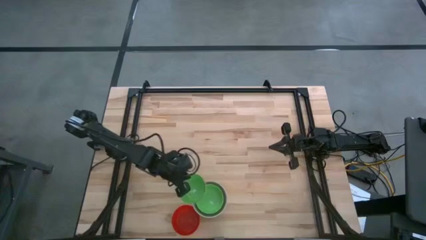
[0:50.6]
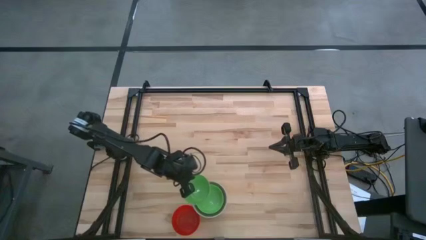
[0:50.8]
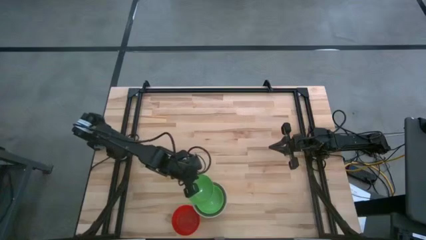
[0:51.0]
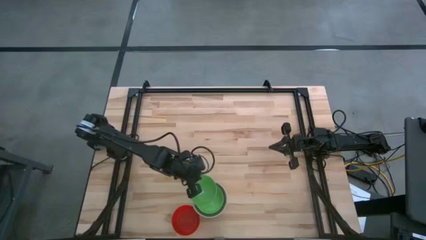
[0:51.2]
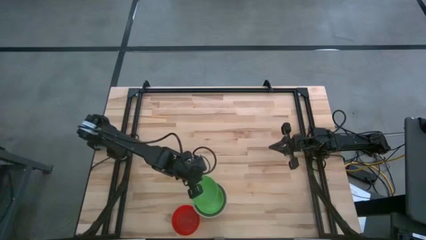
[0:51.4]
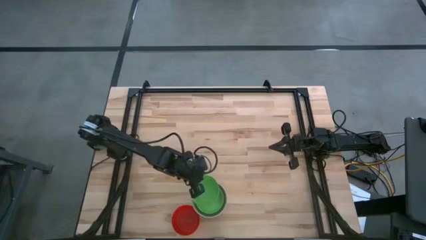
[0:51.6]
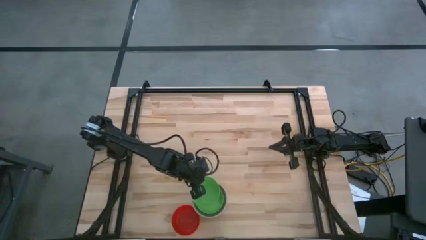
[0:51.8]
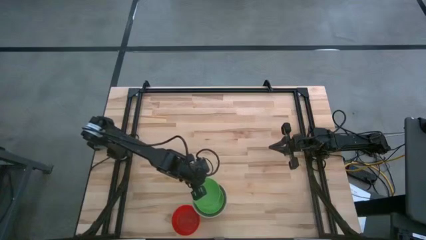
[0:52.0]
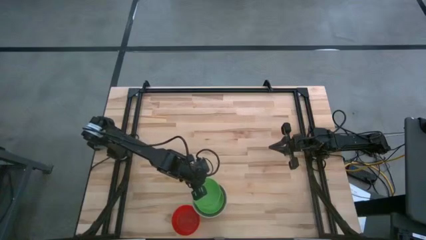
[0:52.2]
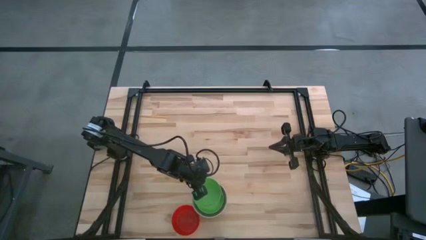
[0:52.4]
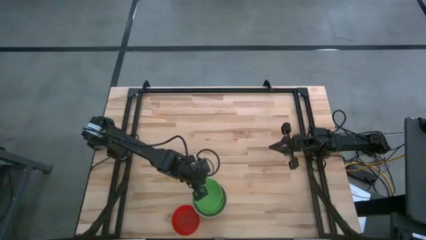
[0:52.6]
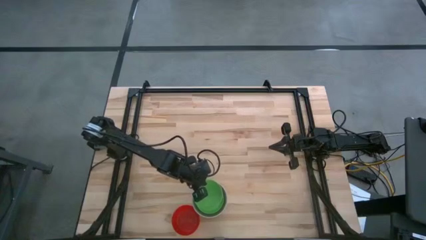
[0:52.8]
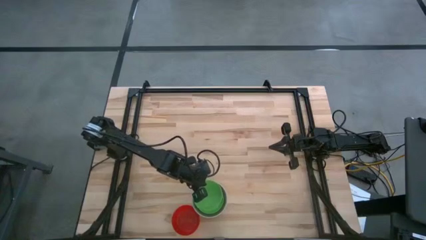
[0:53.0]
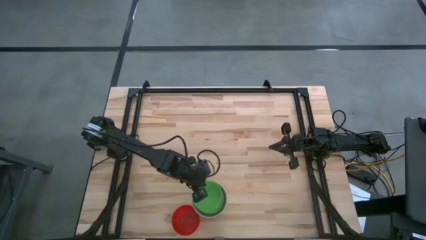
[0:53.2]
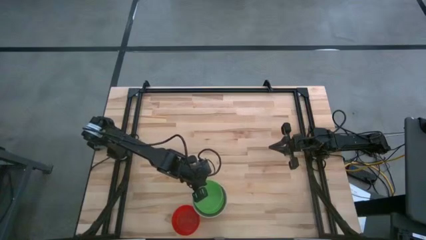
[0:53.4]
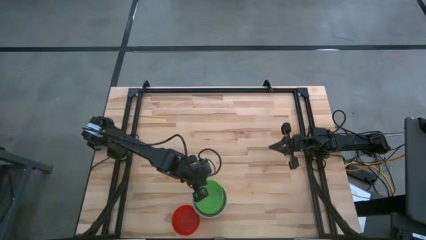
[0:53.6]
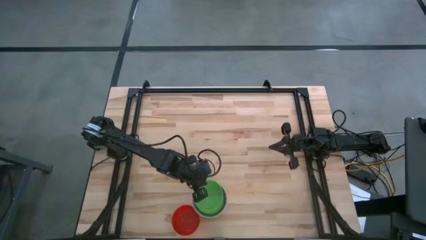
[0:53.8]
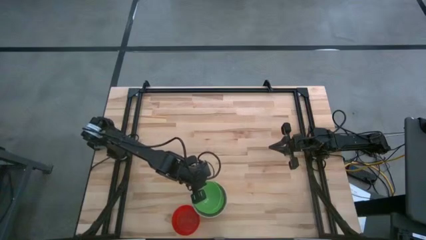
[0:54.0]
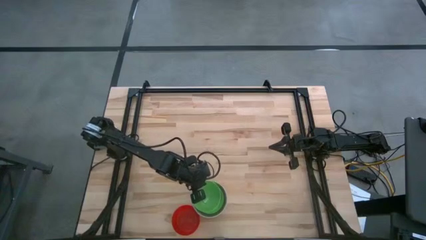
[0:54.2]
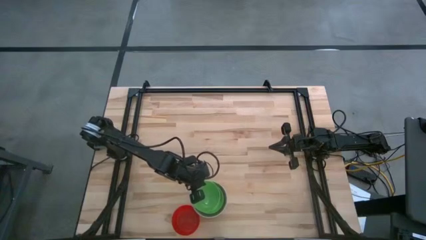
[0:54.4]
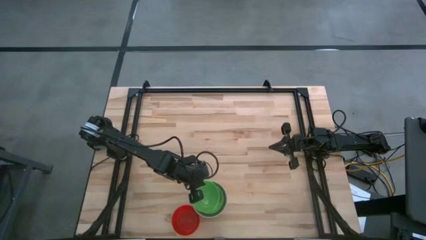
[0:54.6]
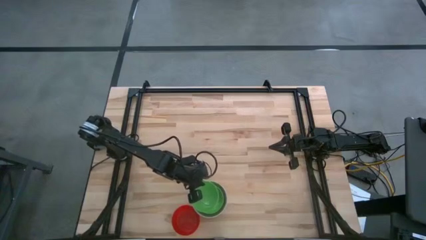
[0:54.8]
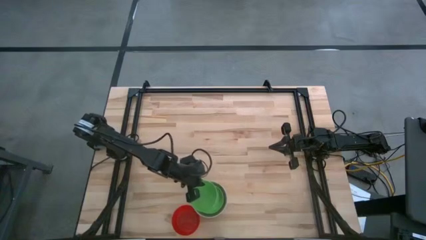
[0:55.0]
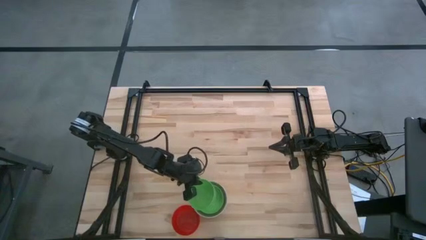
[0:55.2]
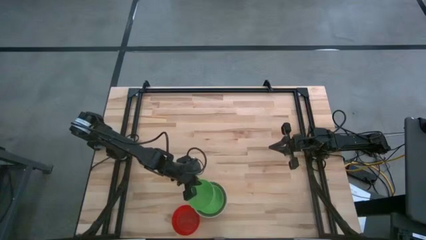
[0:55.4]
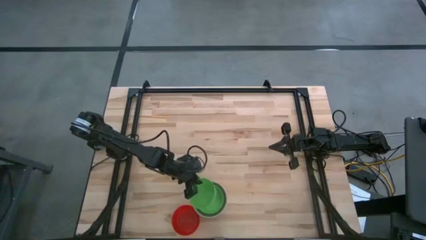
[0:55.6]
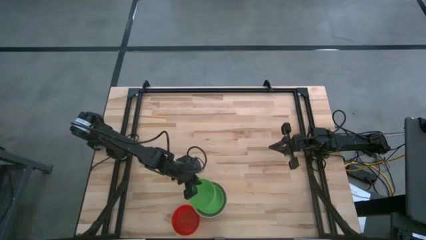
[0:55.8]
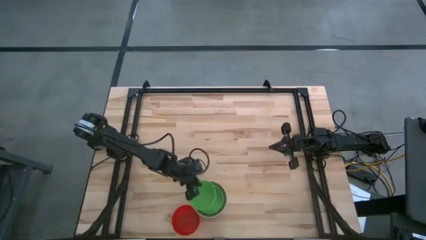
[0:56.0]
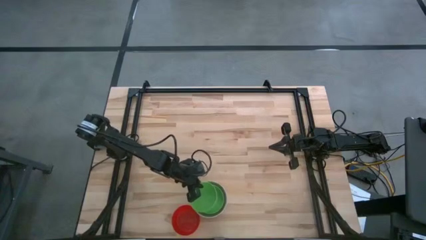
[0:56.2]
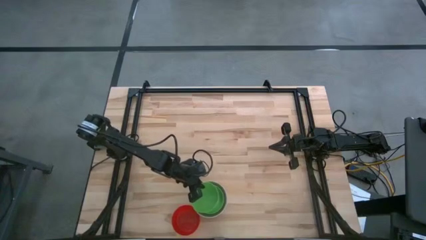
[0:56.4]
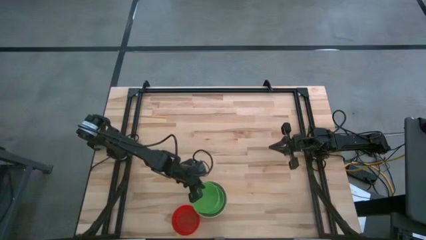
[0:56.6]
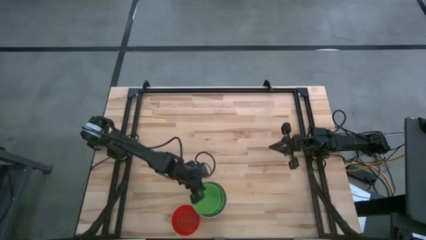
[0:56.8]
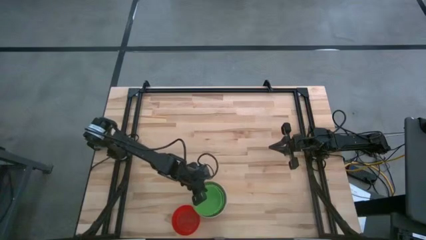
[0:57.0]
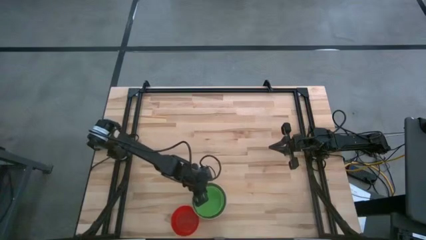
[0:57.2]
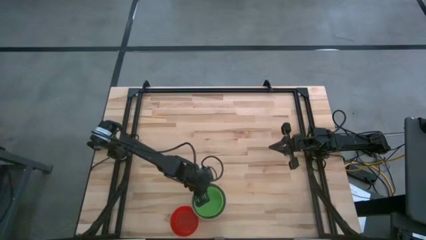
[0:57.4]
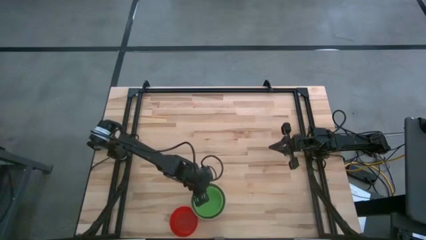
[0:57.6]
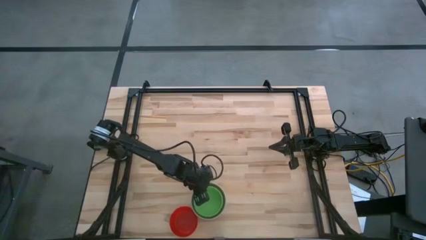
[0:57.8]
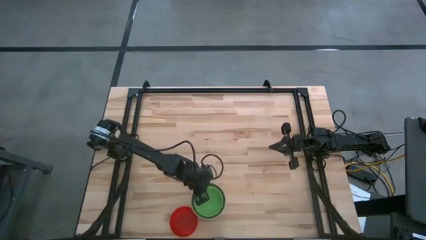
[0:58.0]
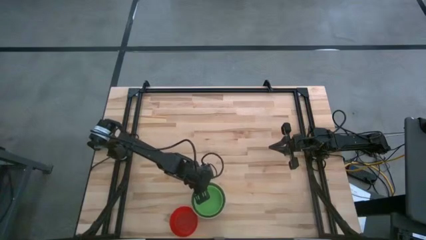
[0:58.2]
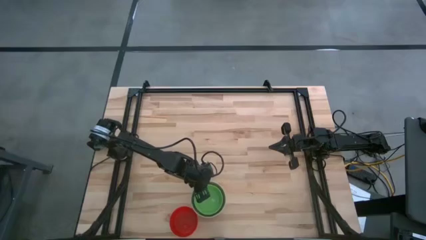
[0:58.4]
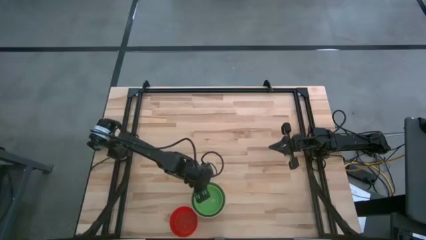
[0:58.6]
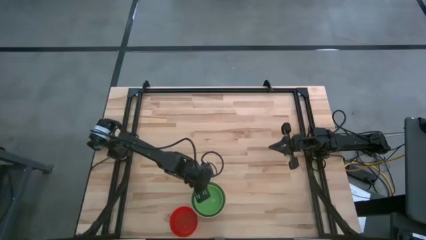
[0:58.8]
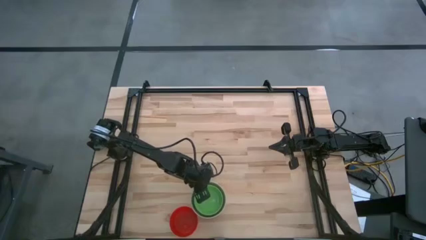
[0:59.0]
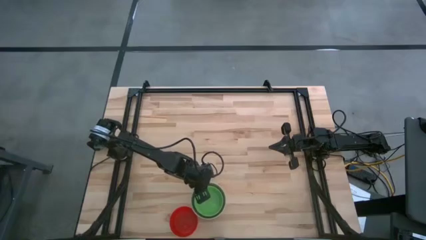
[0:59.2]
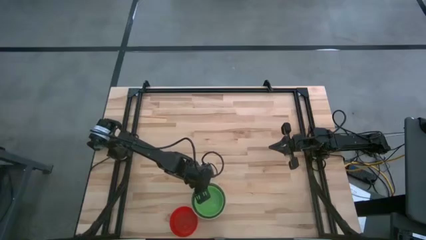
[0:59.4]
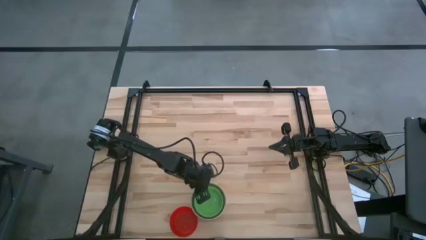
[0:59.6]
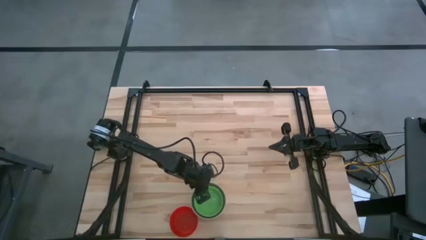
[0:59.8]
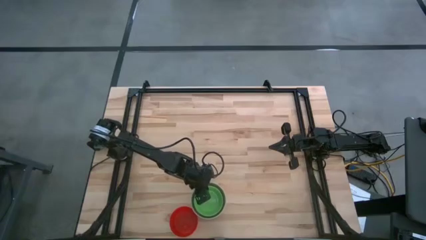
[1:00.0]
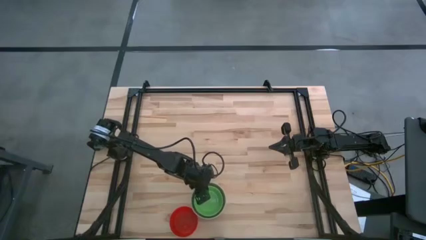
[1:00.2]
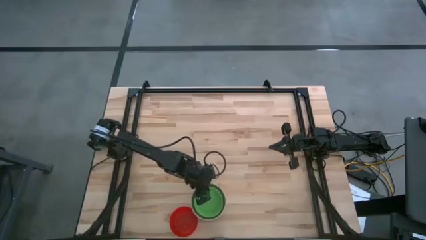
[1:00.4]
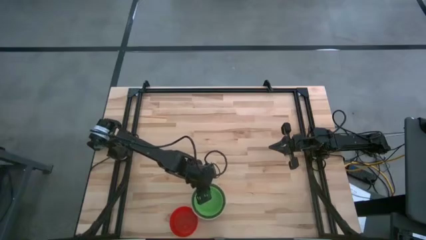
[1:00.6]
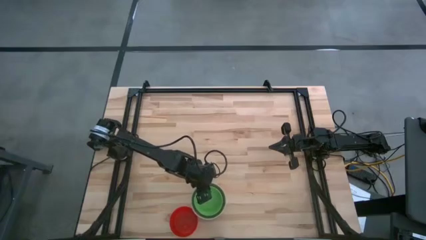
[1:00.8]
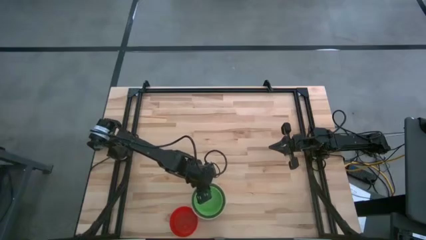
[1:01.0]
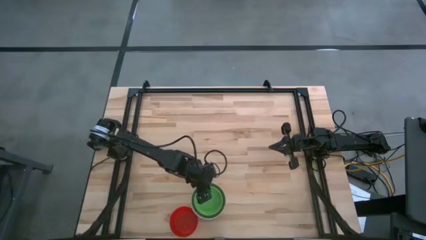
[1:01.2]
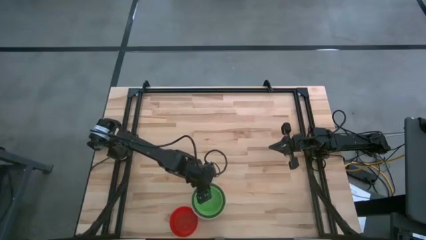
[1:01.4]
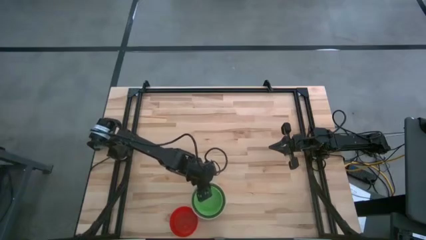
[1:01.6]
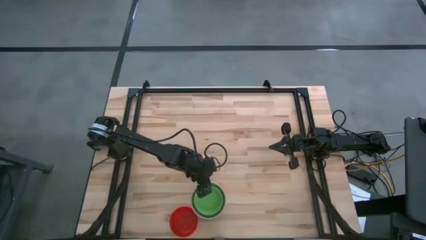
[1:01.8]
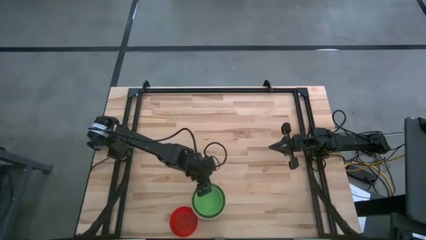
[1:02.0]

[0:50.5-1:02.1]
Stack the green bowl on top of the green bowl
